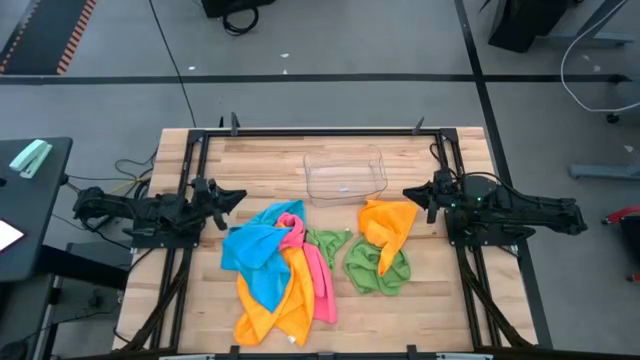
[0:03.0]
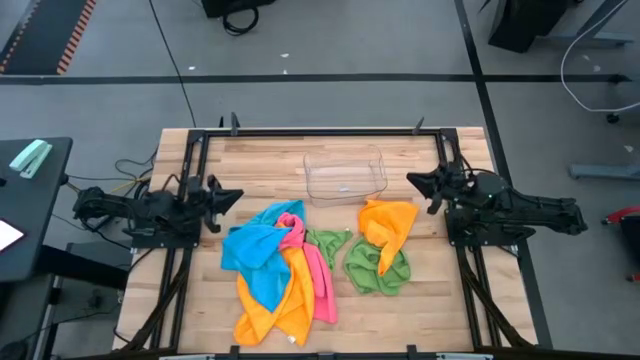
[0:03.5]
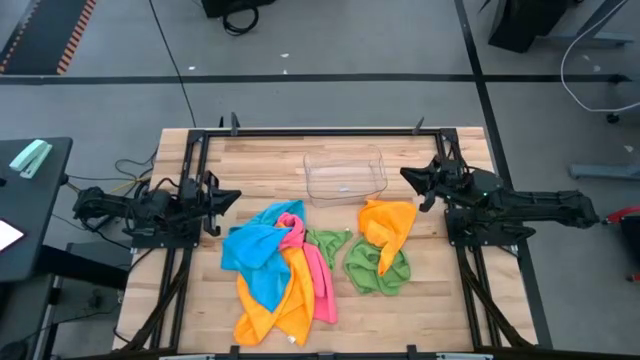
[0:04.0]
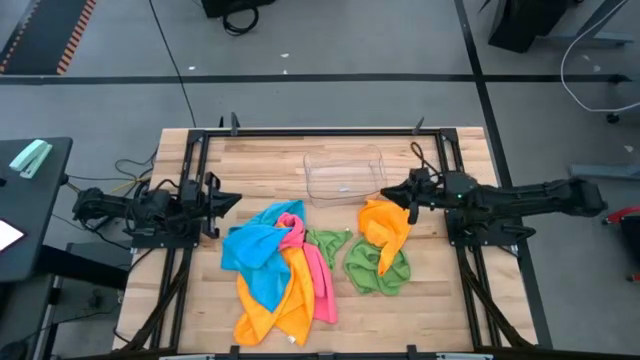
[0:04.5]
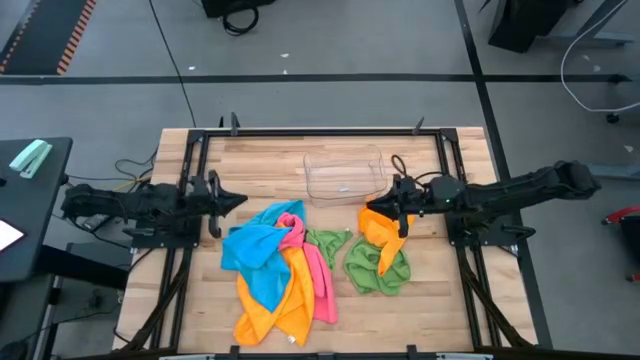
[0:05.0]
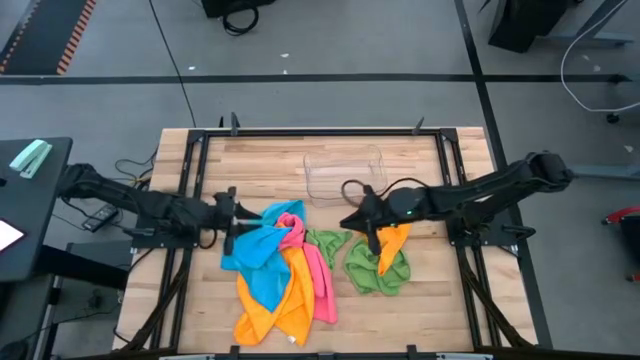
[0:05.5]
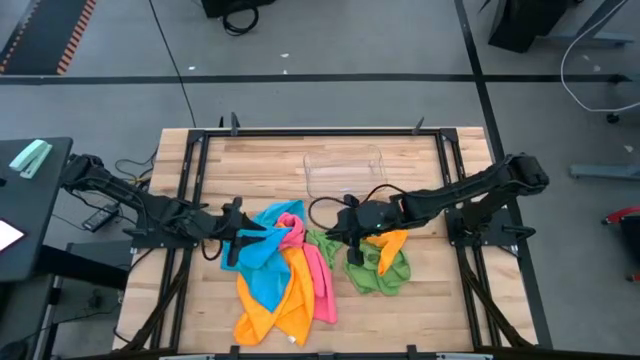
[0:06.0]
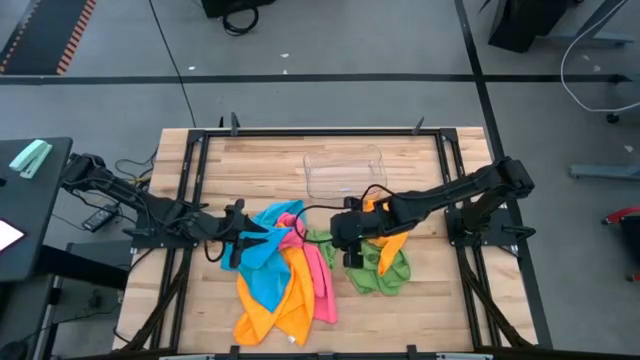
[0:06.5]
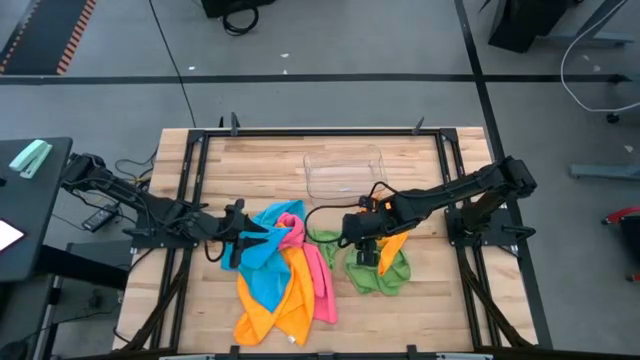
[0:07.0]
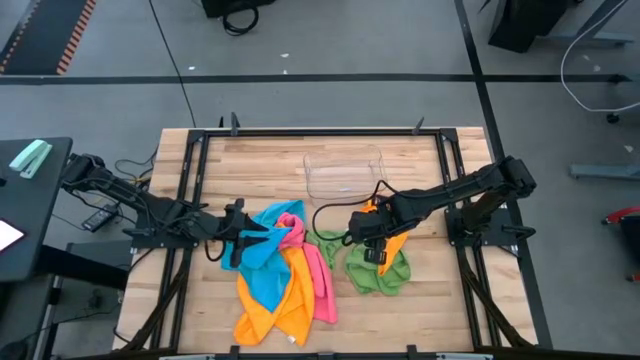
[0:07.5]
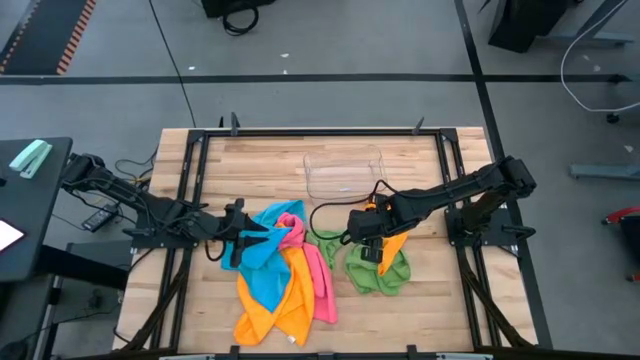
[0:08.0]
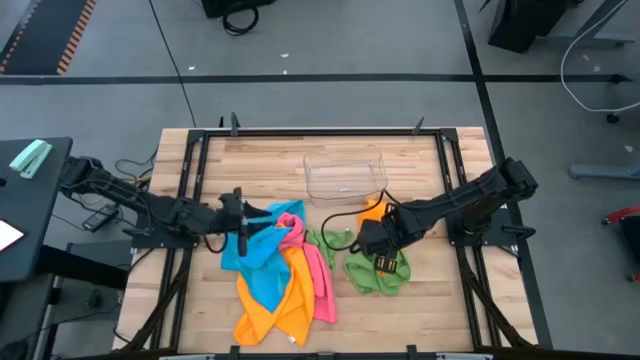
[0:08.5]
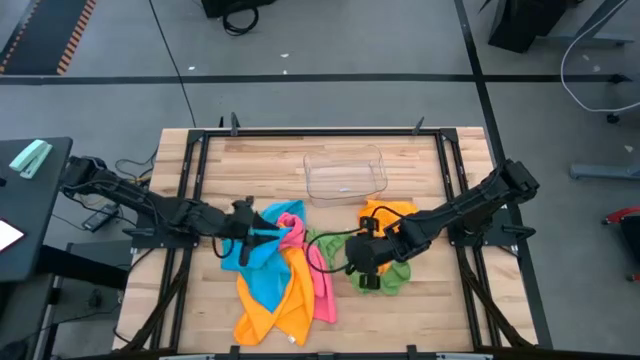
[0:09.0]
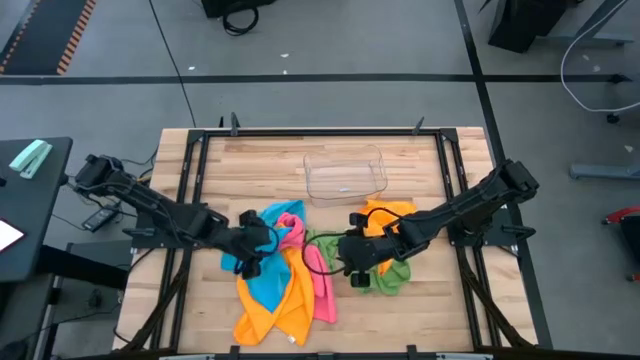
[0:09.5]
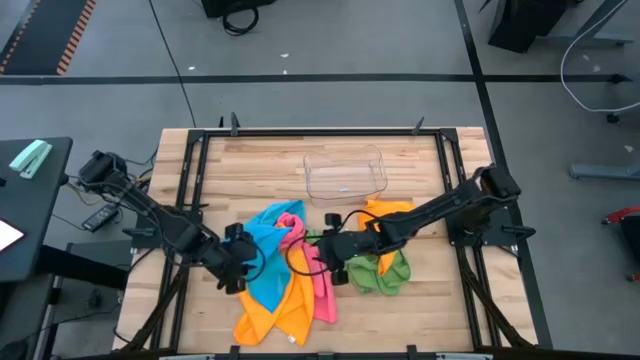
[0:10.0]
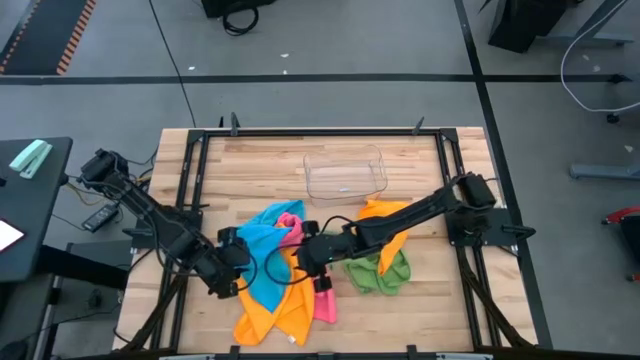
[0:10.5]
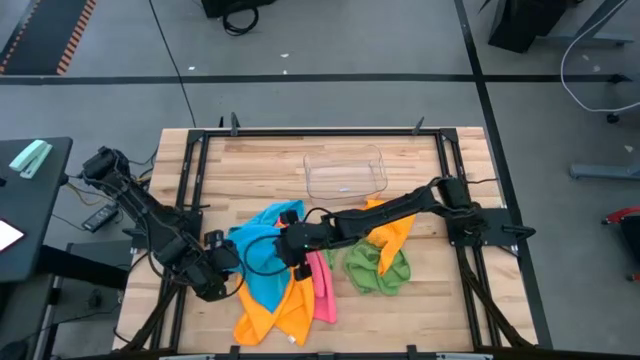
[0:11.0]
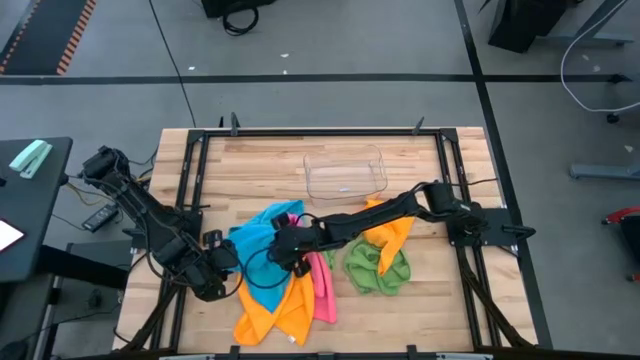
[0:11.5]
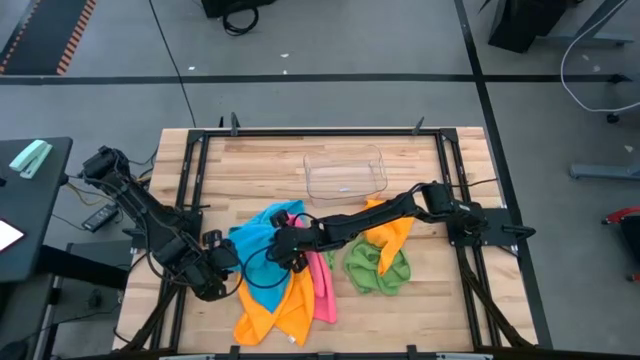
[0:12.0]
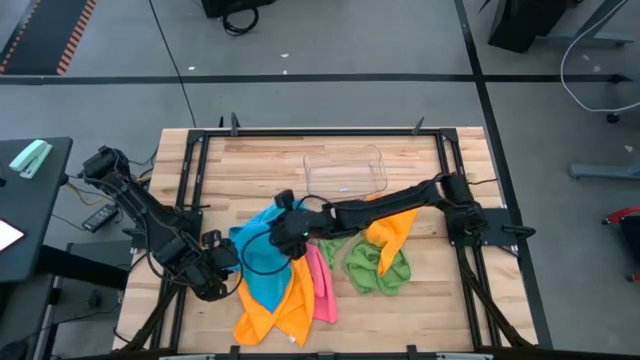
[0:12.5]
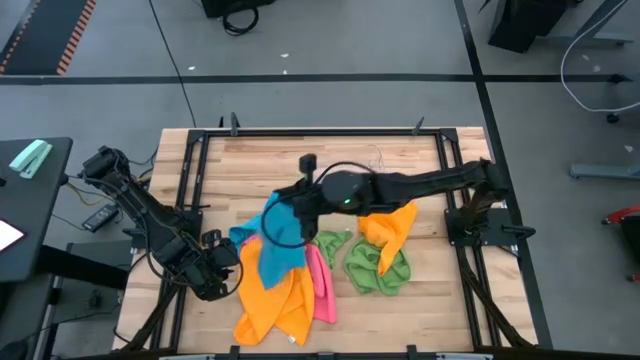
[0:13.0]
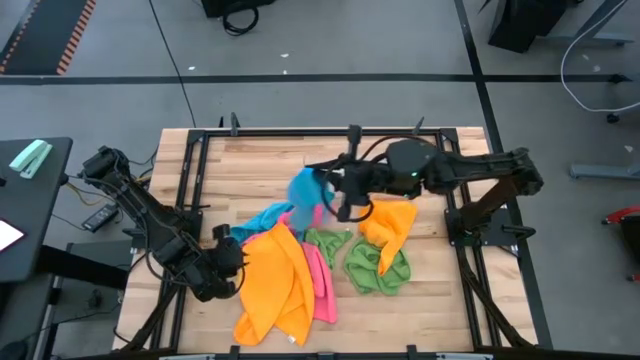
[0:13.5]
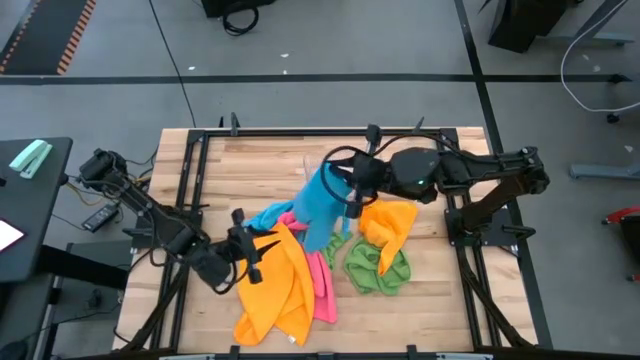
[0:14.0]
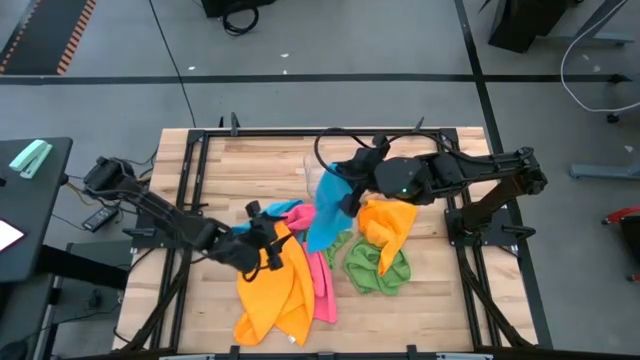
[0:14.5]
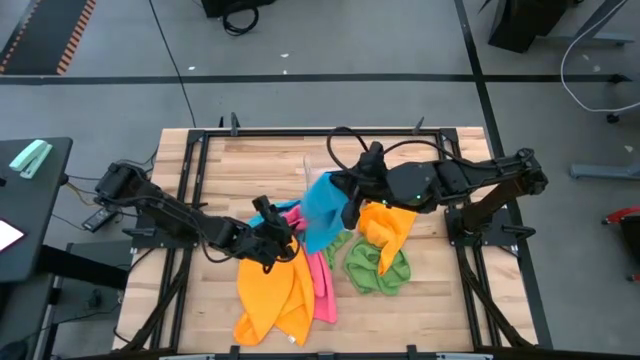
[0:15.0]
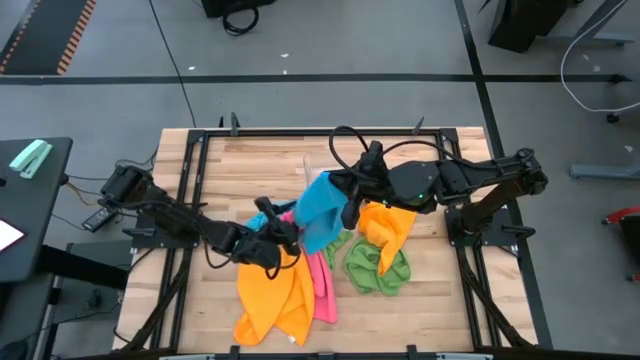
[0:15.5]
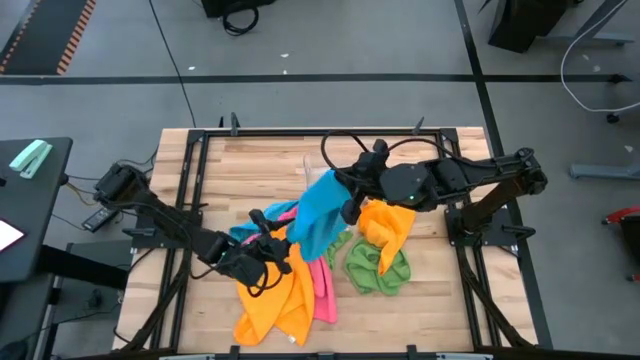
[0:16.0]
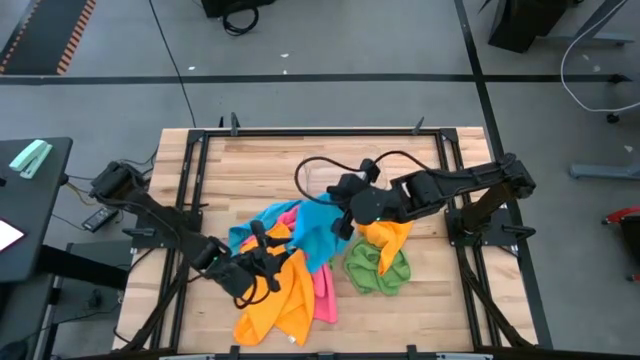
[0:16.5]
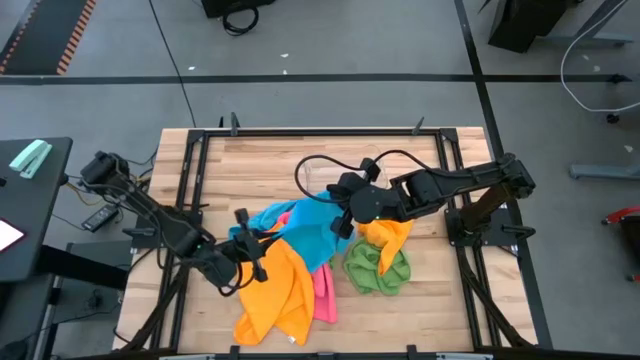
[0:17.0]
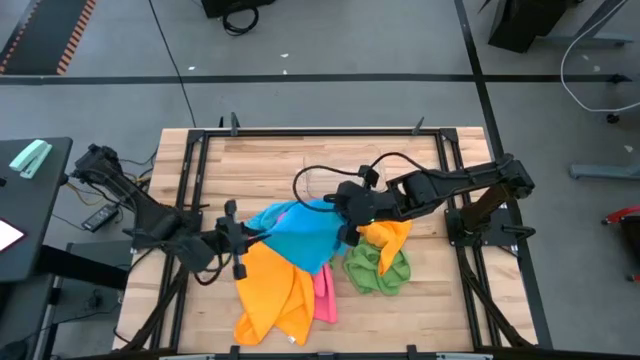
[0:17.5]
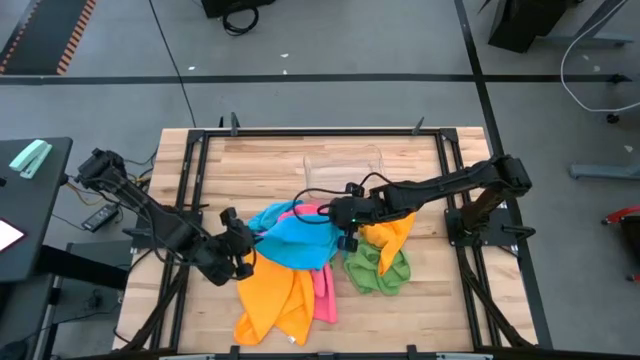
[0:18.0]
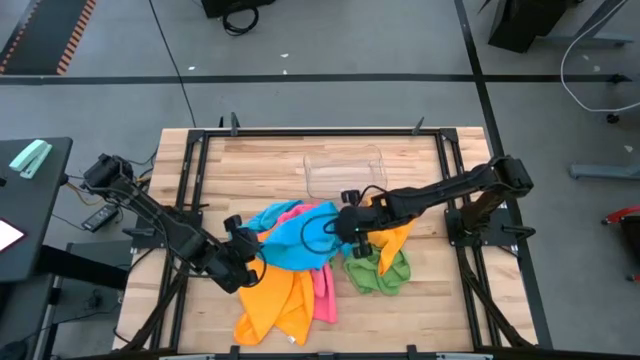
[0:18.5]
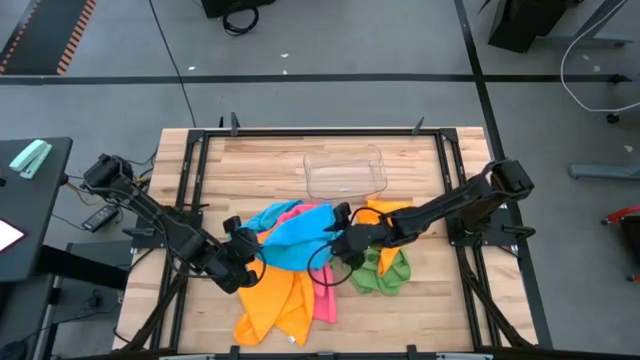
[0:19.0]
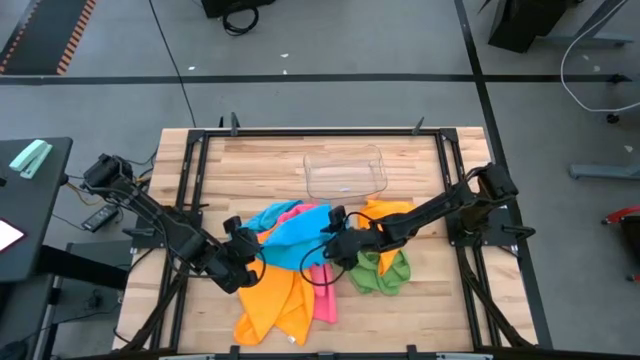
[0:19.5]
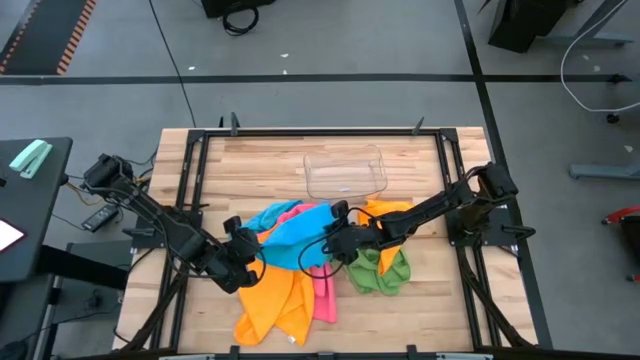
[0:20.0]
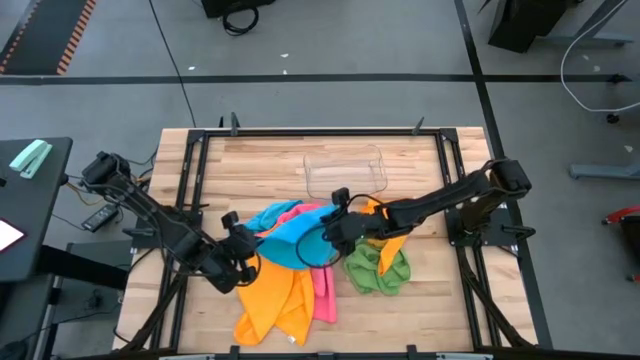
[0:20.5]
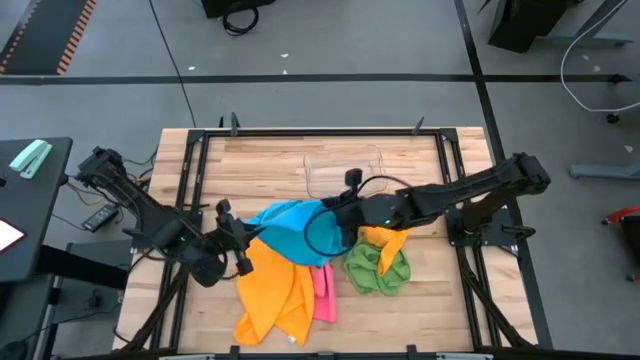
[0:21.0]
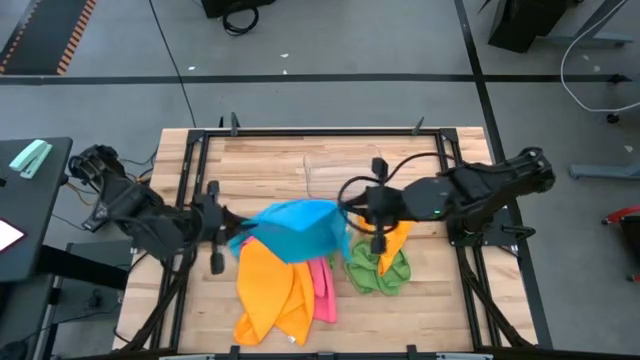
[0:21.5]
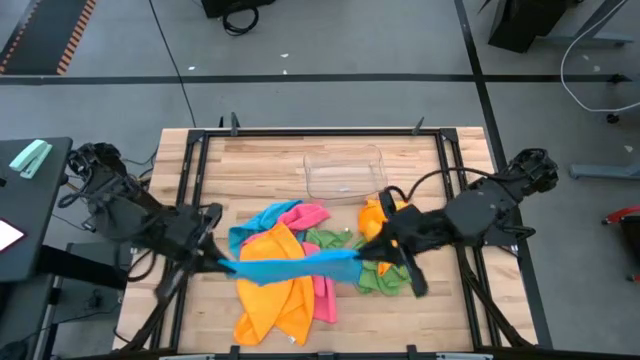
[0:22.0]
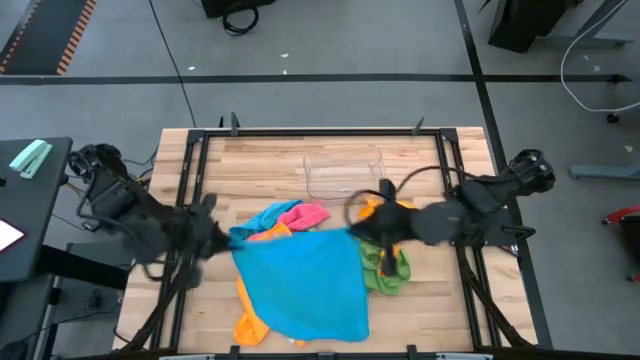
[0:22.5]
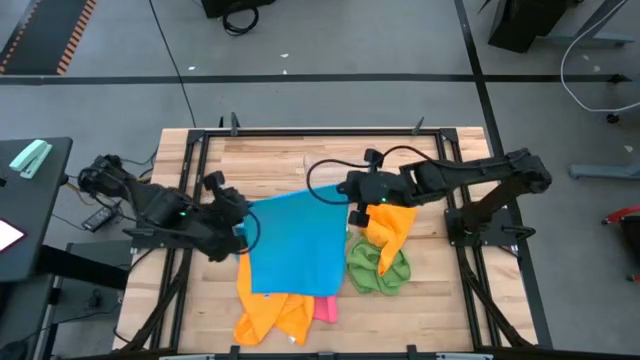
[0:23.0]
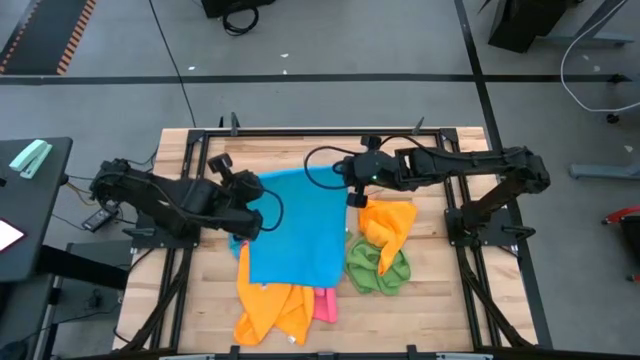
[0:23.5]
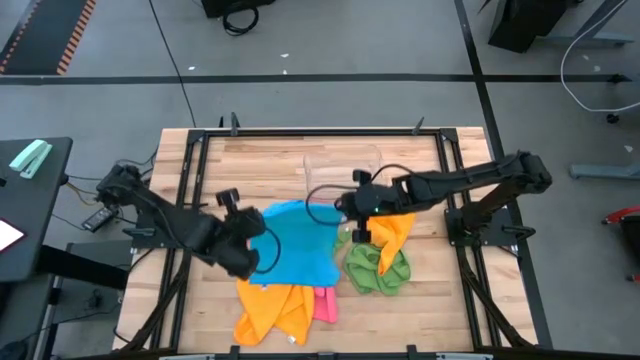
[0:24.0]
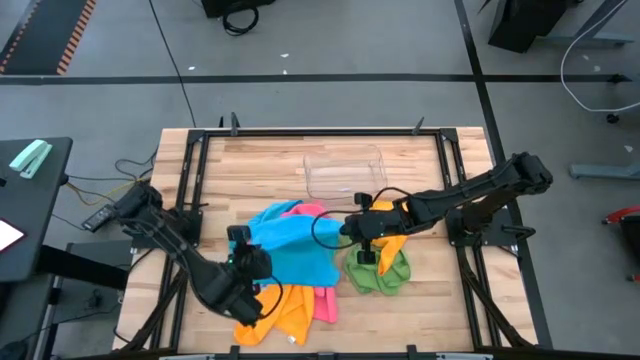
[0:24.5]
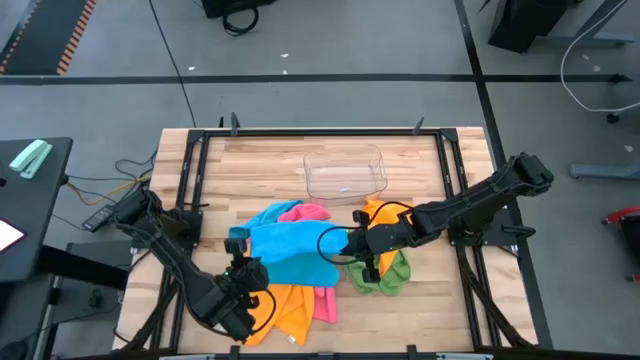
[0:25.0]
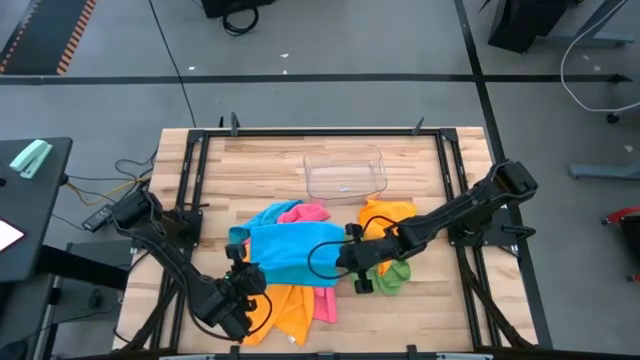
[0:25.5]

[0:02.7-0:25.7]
Task: Fold microfiber towels
Fold the bottom blue microfiber cloth
